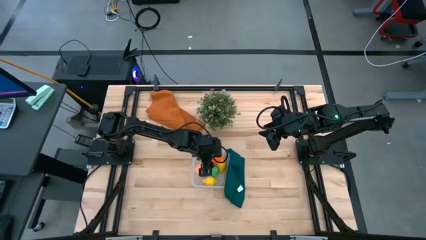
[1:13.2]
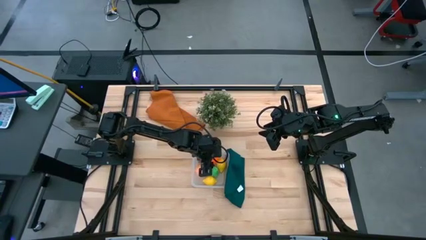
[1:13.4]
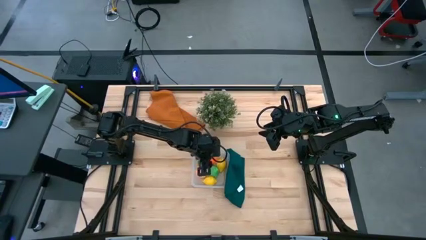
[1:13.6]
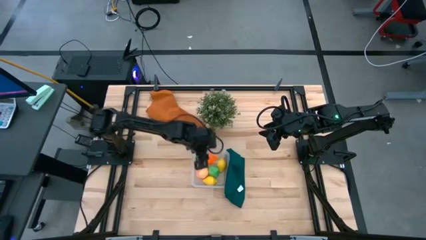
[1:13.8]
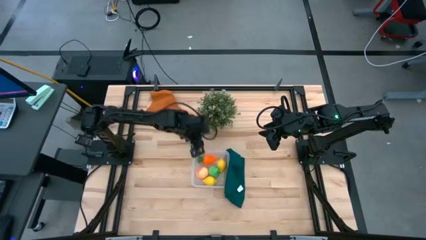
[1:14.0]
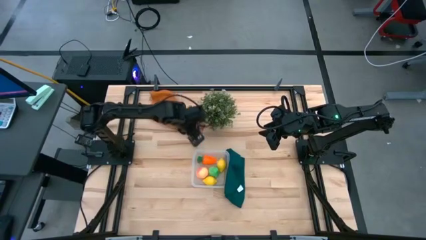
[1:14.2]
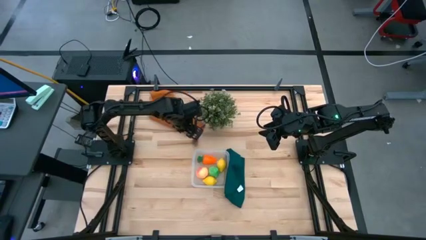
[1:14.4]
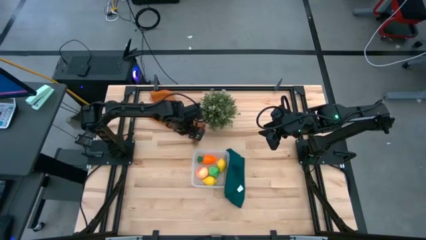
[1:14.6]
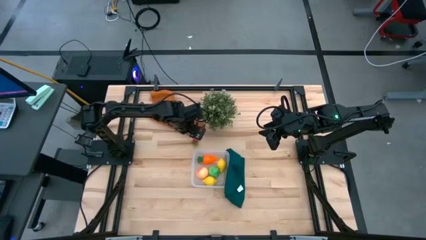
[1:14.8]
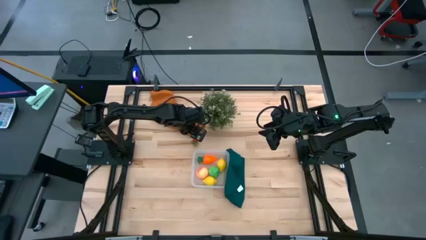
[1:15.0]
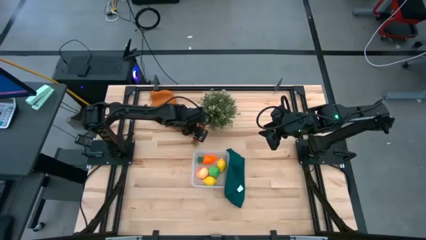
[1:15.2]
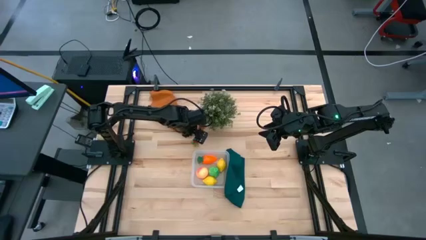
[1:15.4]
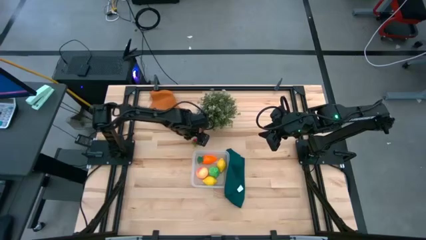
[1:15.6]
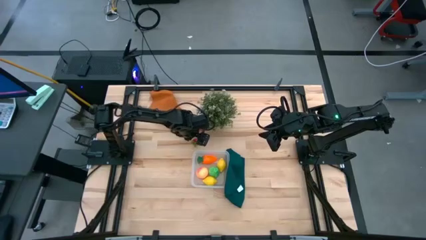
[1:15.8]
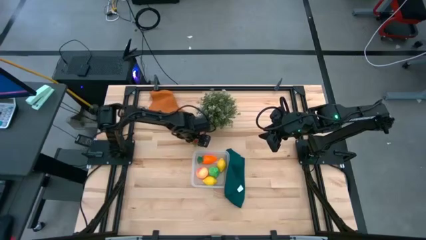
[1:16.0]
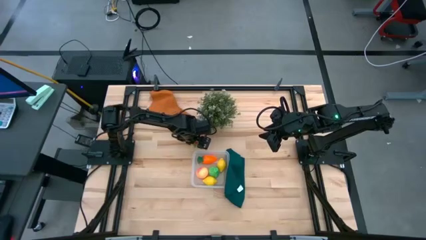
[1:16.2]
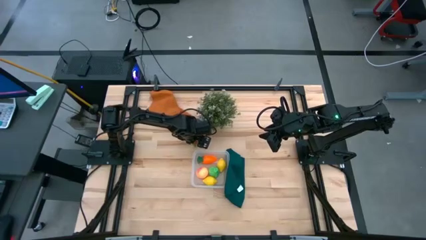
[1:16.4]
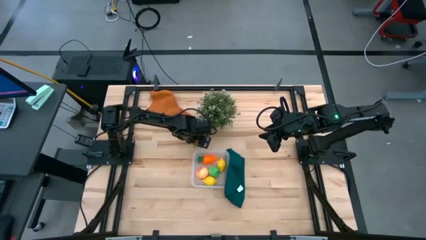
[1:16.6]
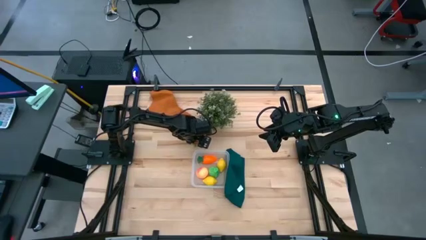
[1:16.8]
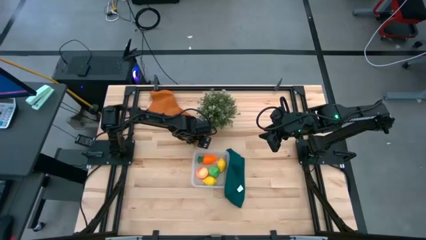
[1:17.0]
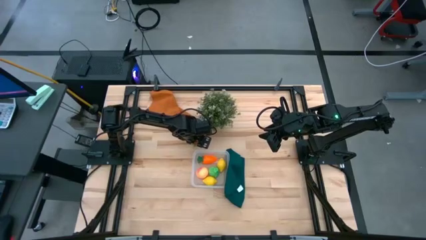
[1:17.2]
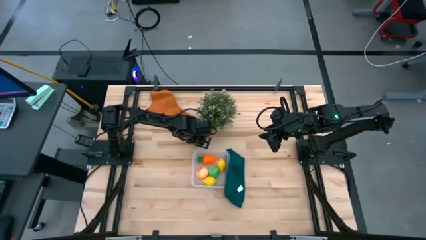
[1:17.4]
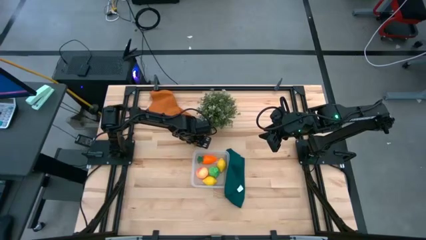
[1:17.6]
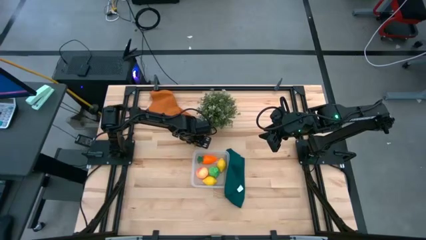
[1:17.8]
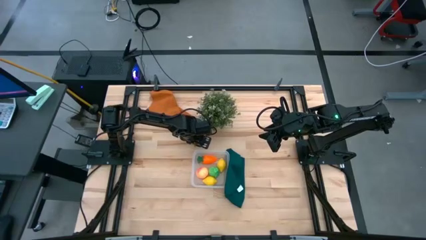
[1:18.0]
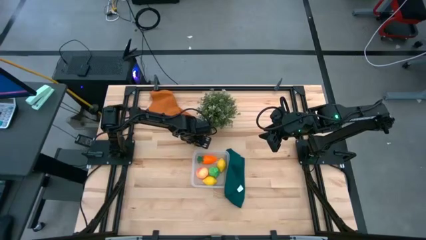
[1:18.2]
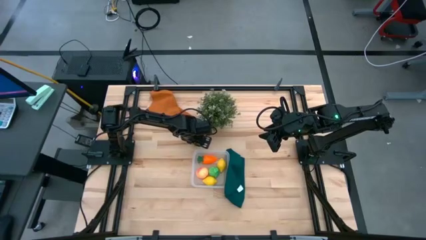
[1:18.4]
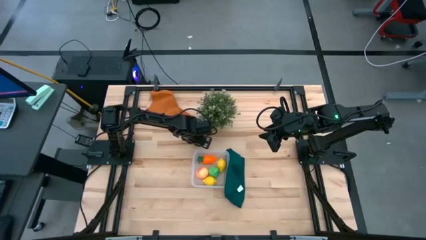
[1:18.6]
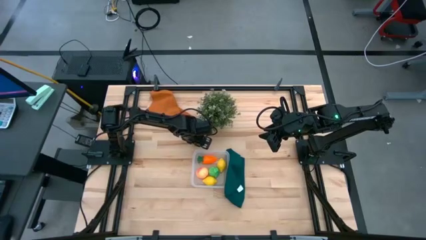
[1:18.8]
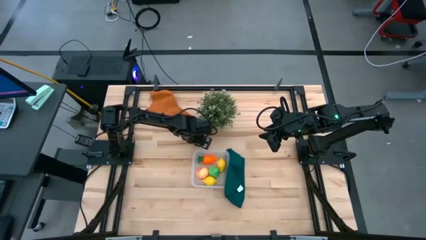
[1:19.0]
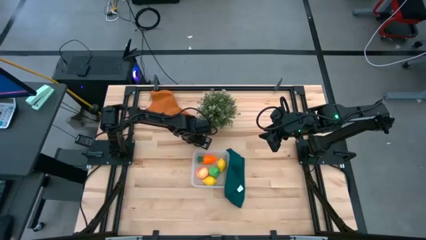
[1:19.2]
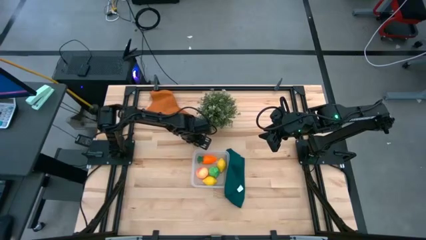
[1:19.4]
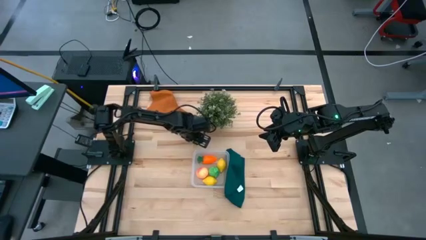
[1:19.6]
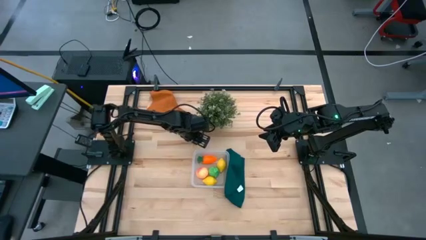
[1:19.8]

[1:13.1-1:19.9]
Task: Pick and placing Produce into tupperware
Put the red strawberry into the transparent bin

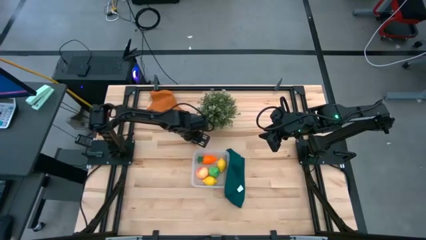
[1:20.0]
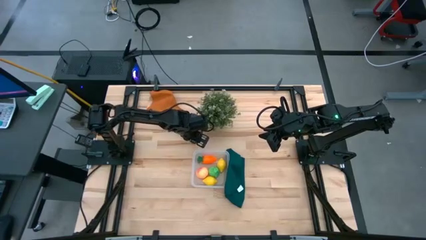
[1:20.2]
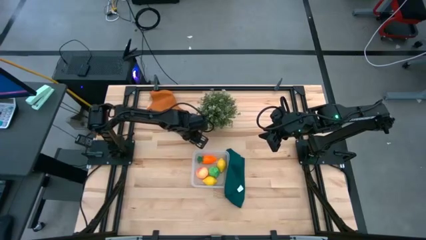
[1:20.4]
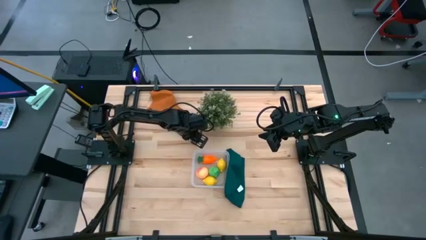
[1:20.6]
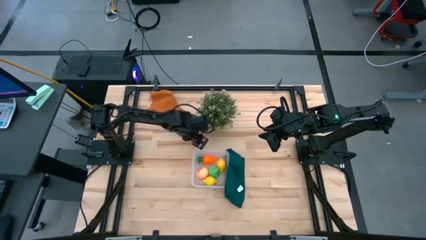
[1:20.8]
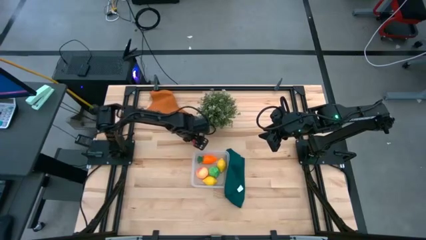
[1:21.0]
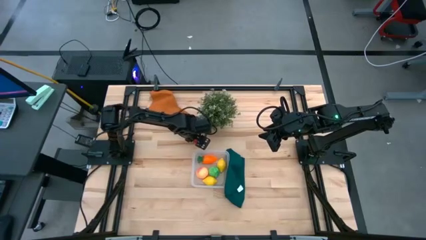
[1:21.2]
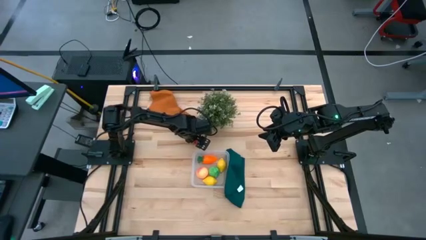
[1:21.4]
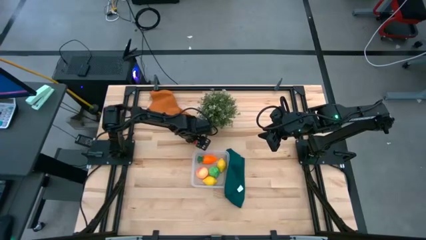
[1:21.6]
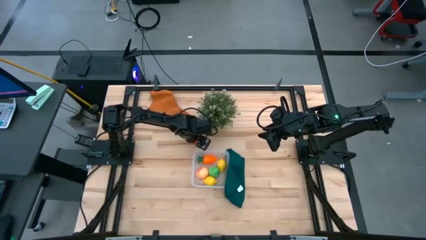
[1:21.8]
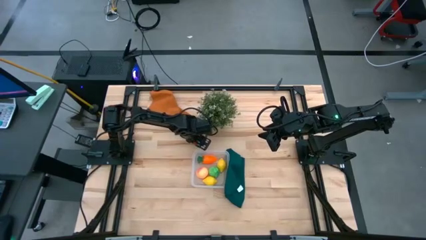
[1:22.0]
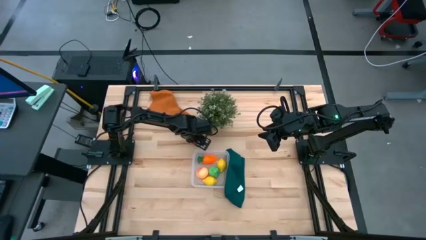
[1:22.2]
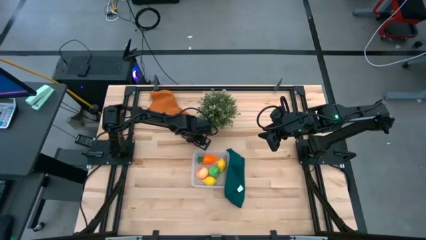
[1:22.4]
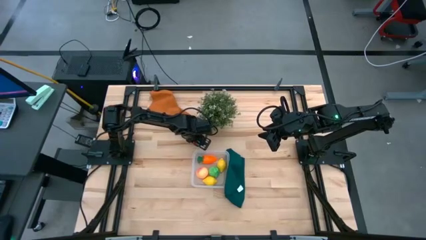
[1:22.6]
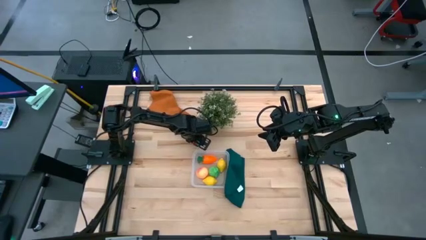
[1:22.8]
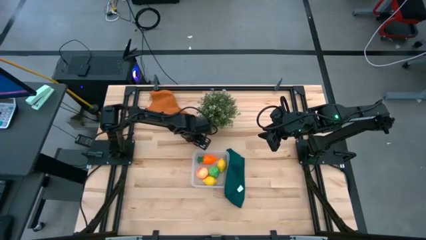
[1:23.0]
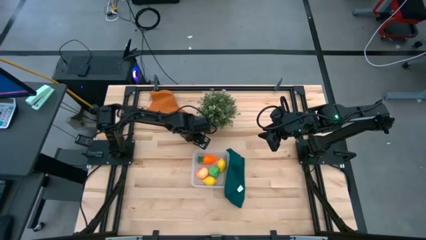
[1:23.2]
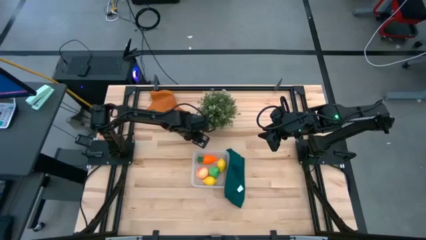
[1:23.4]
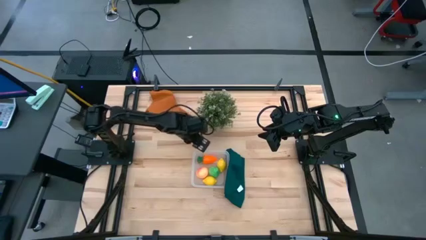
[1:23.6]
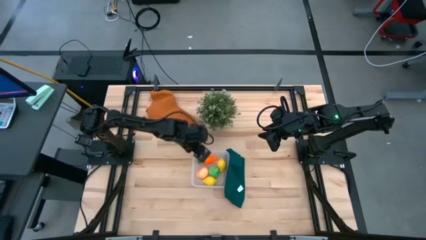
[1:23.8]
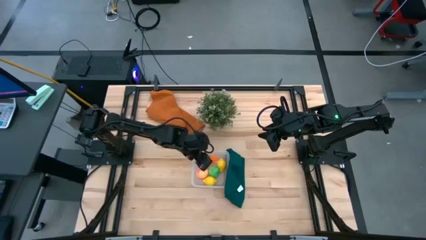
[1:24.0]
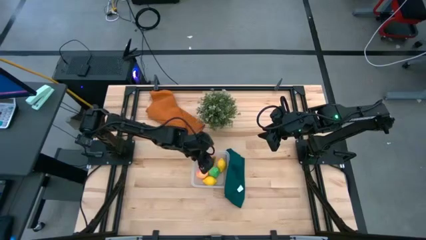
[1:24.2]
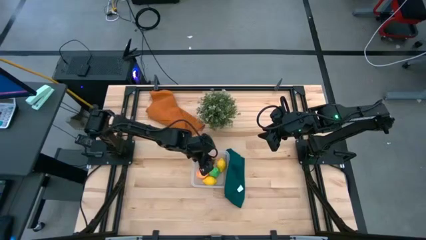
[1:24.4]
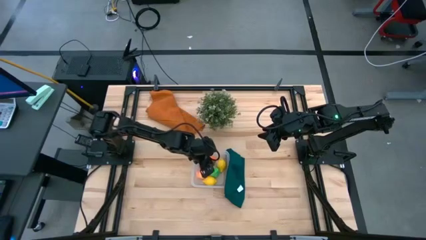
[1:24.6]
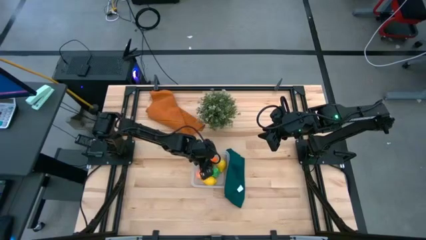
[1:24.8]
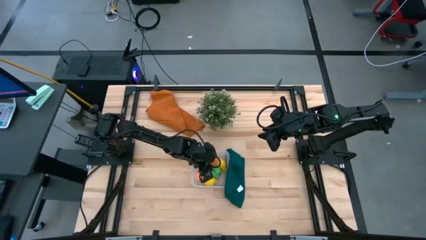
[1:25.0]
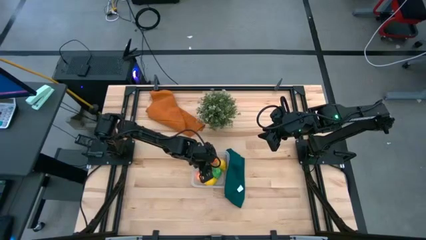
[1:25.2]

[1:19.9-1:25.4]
Put the red strawberry into the transparent bin
